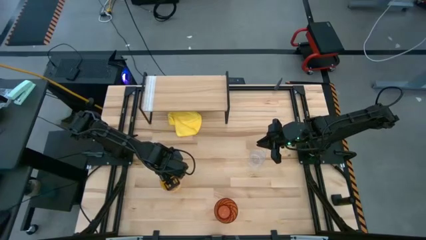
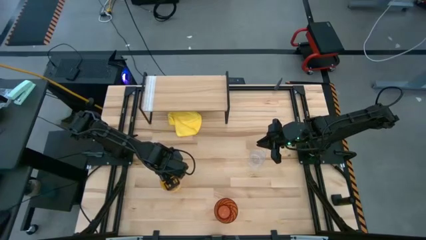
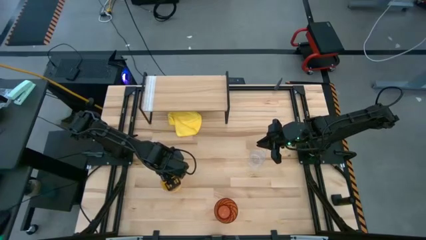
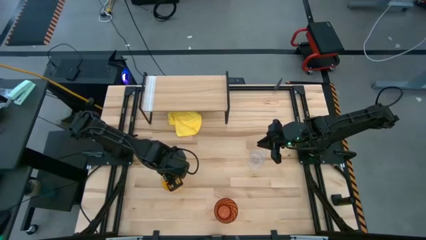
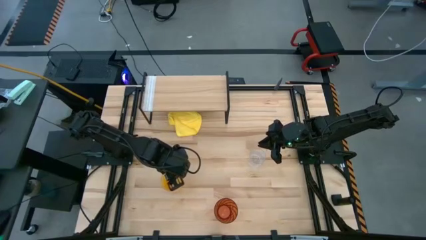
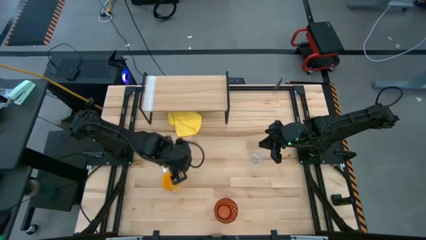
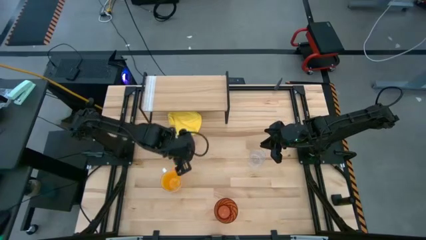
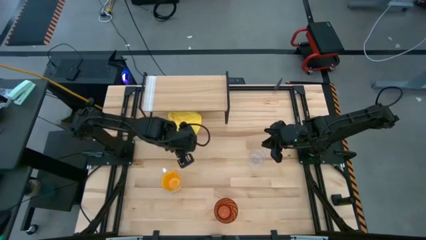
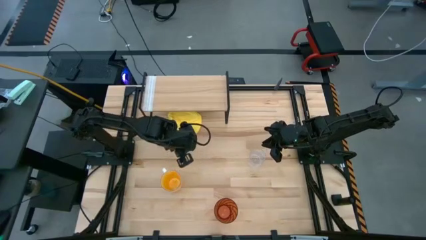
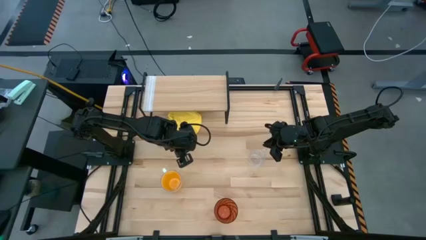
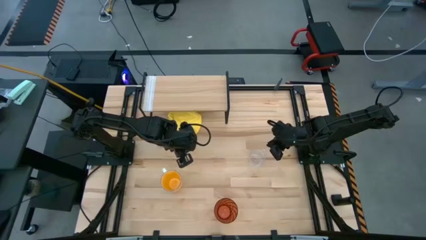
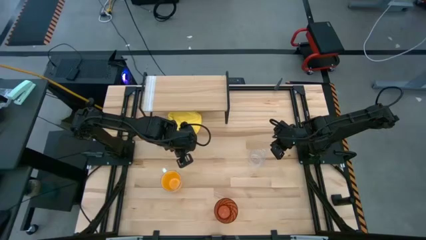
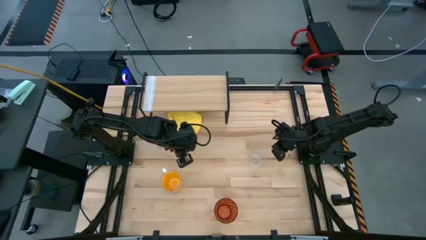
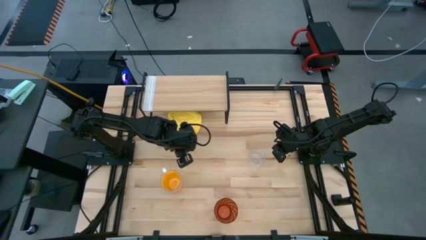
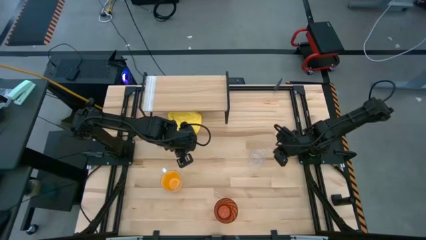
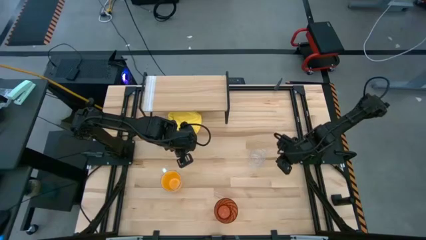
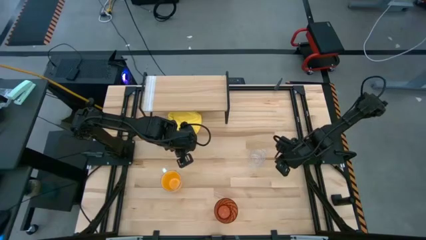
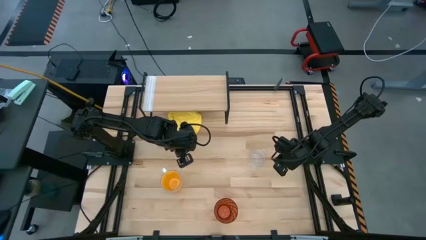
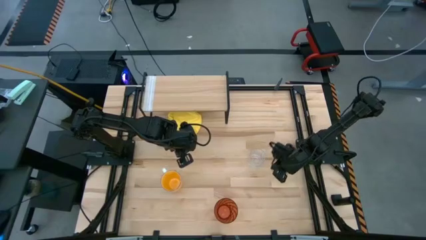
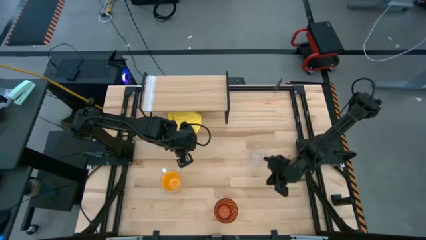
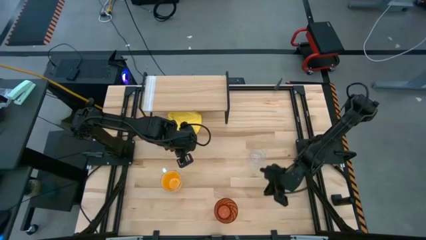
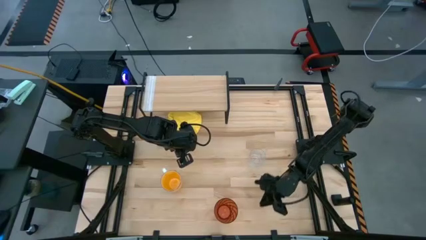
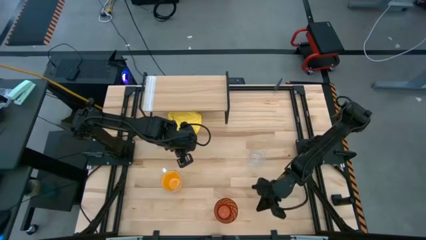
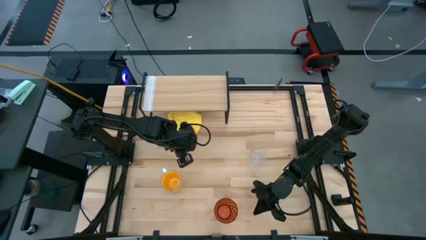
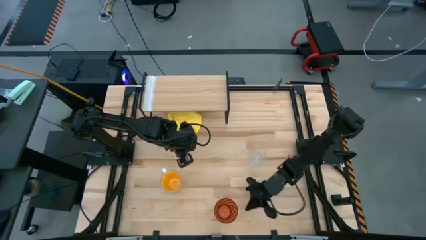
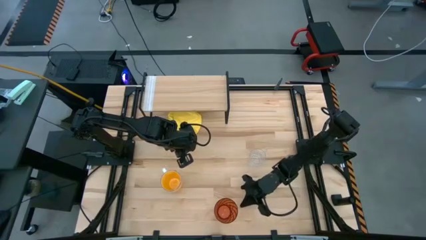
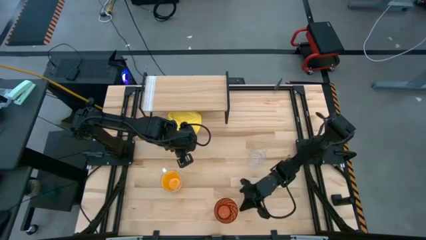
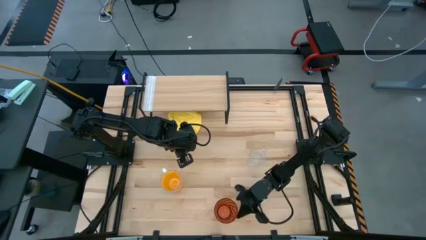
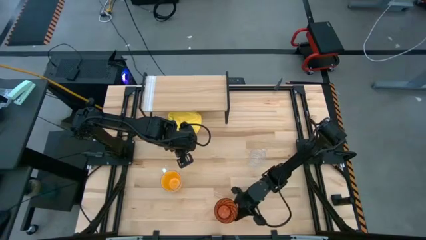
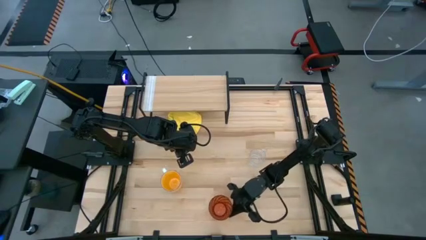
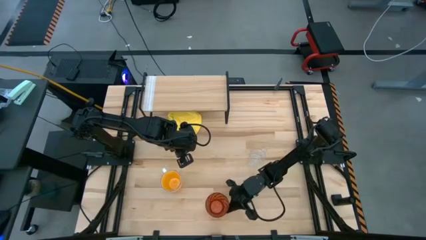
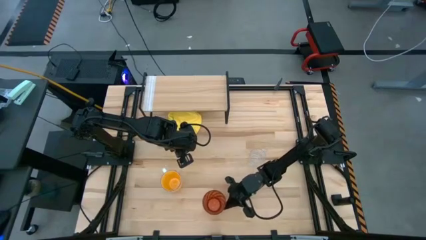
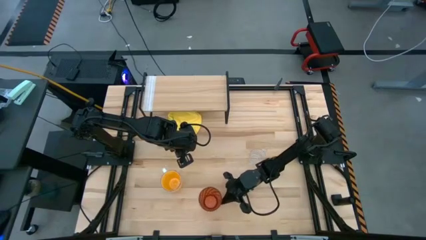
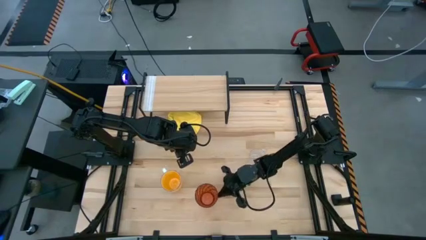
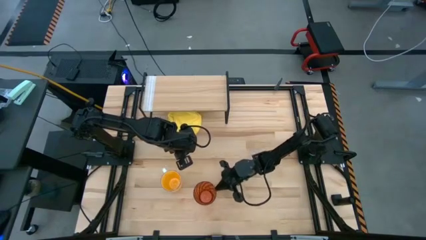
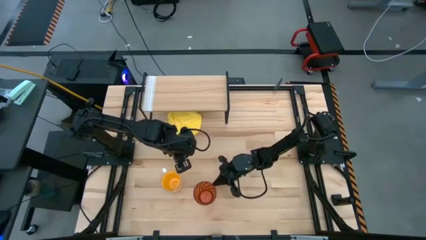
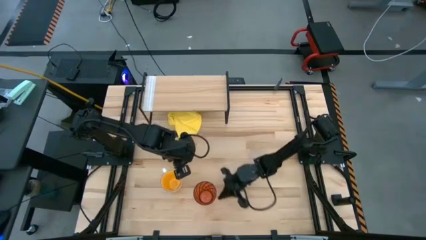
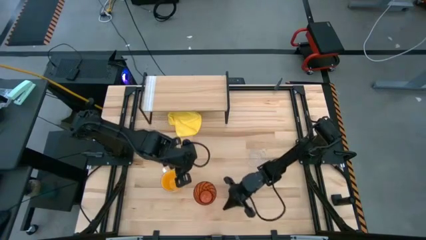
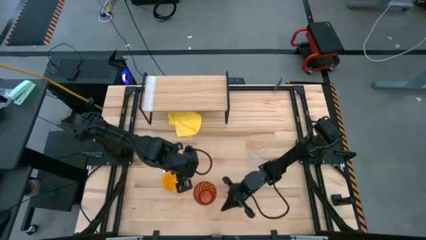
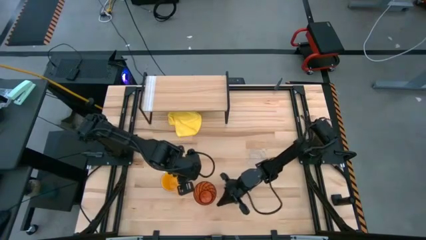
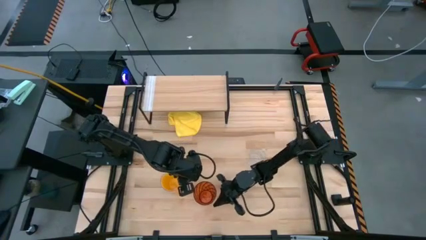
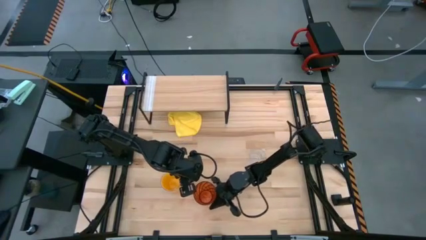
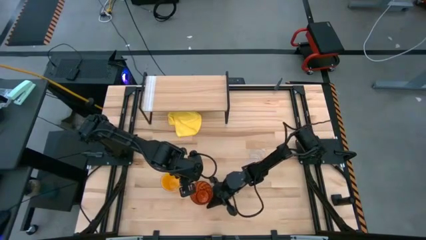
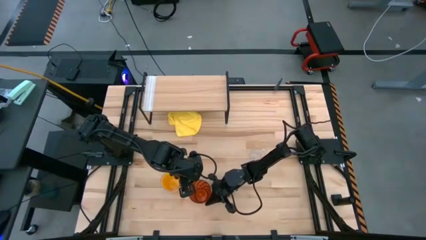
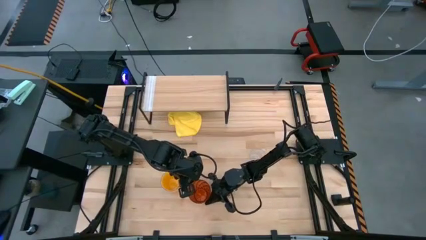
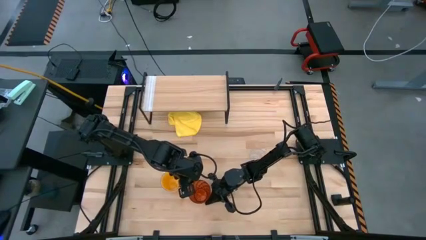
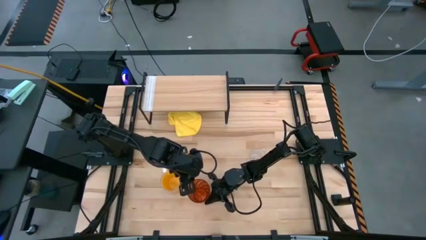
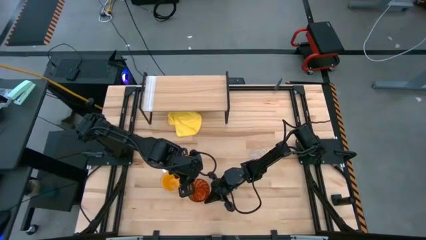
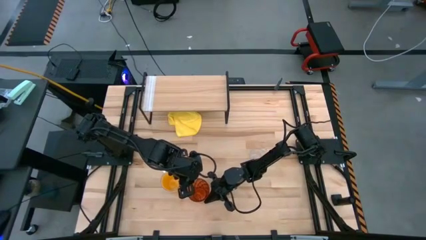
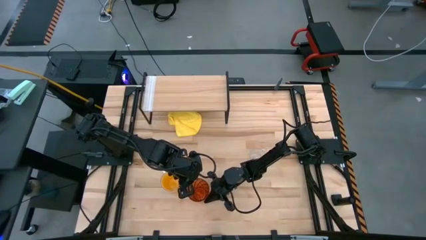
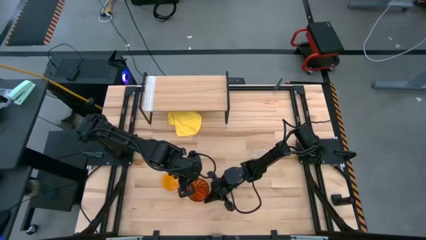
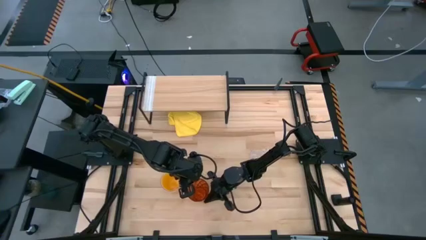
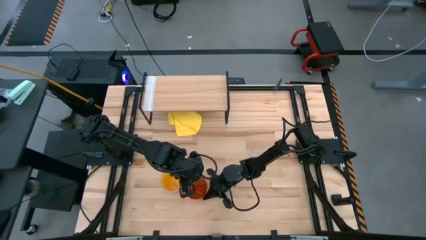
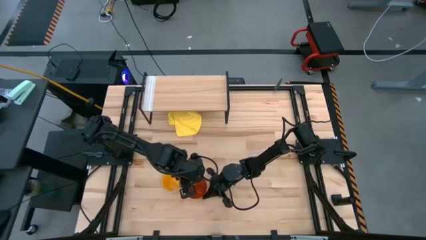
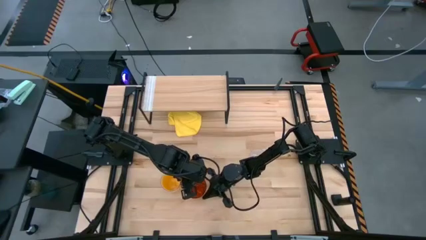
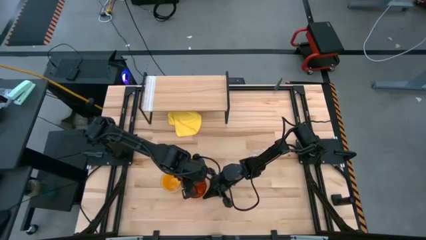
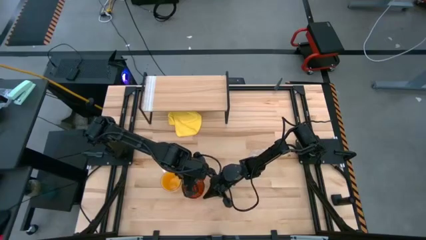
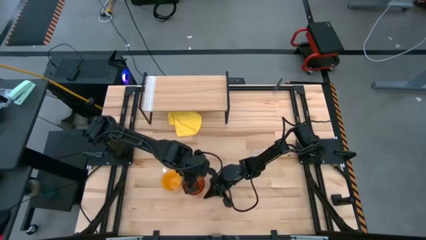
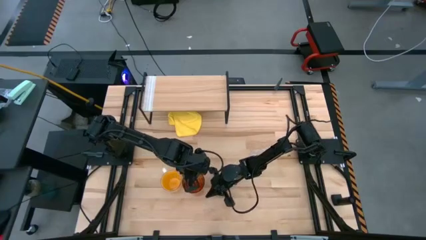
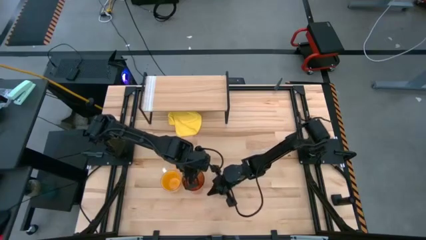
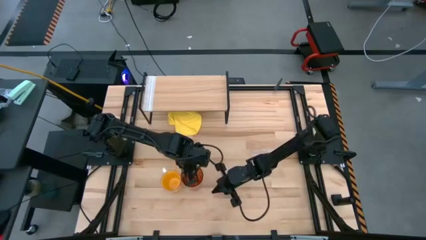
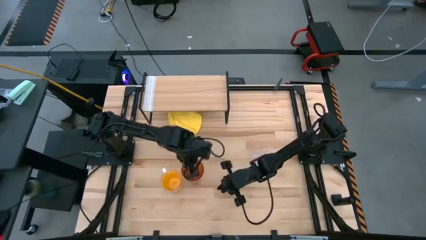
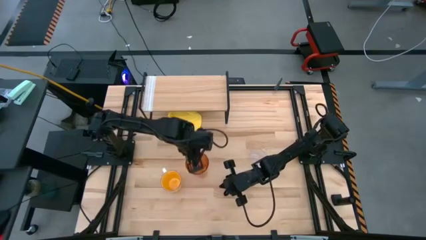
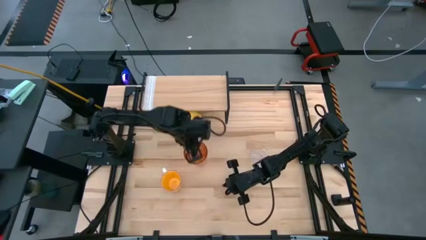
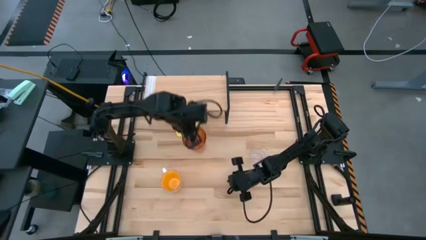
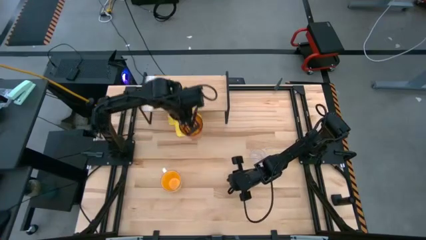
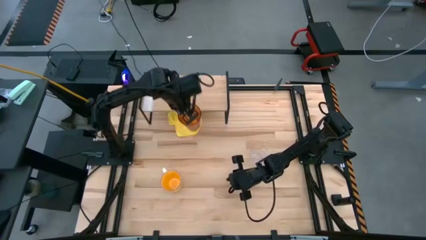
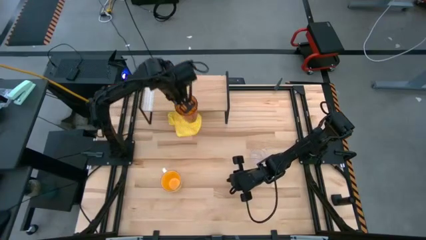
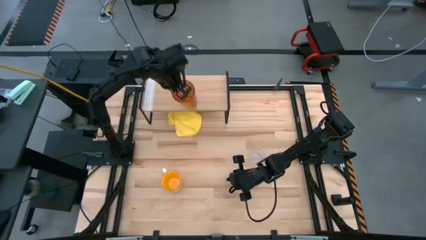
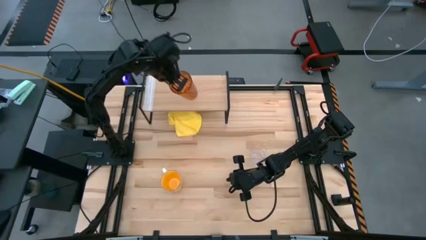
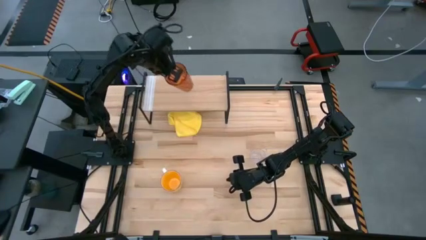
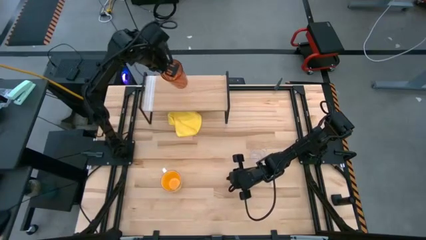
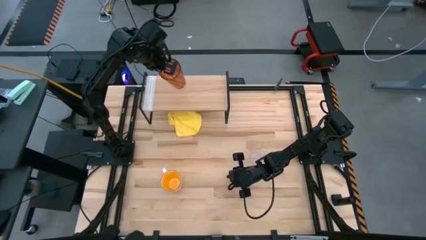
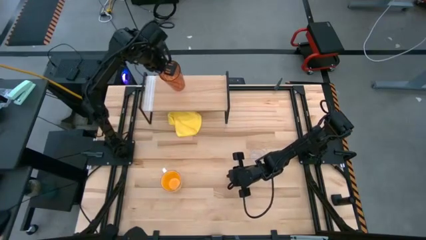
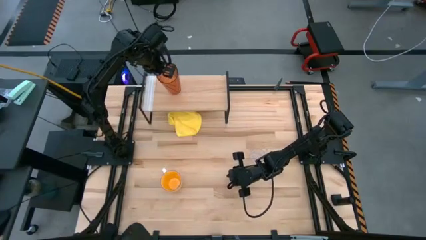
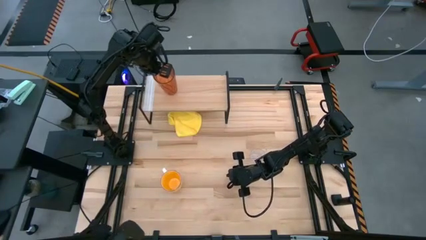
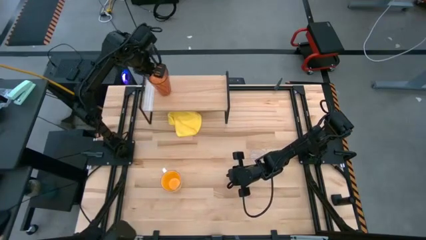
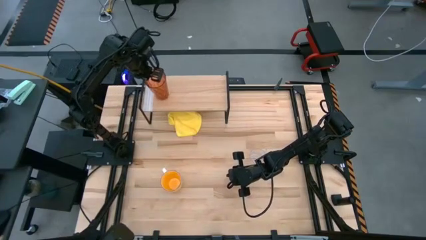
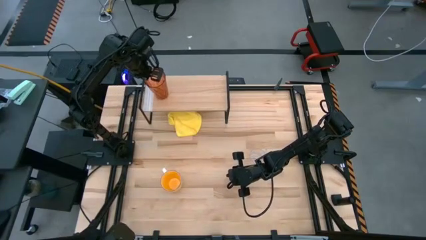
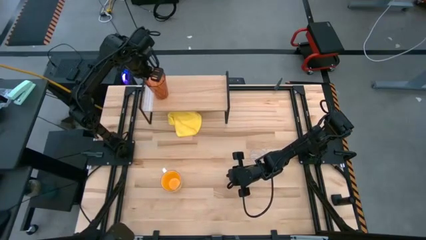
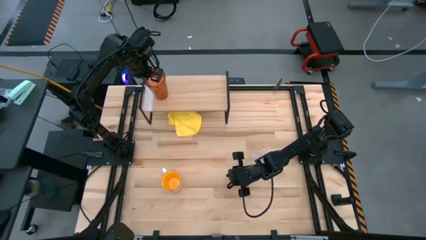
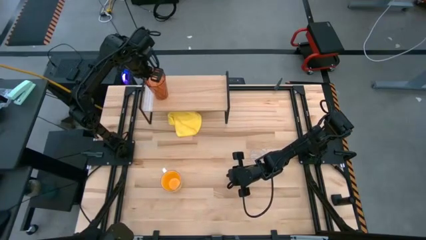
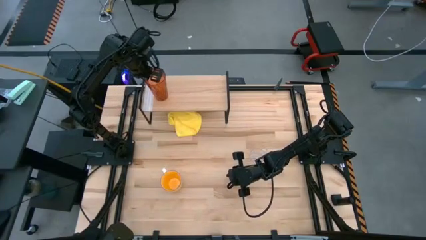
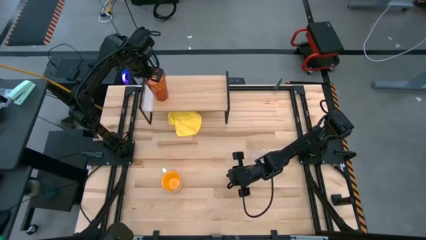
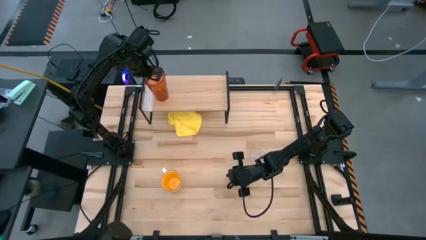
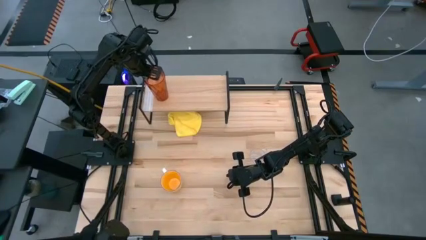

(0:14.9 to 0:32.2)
Task: Stack small to large cups/mugs on shelf
Put the orange cup on the shelf
